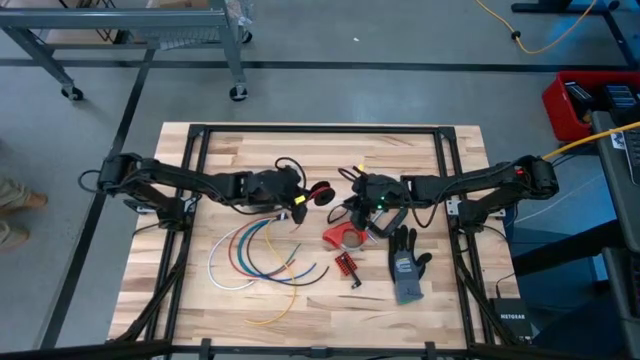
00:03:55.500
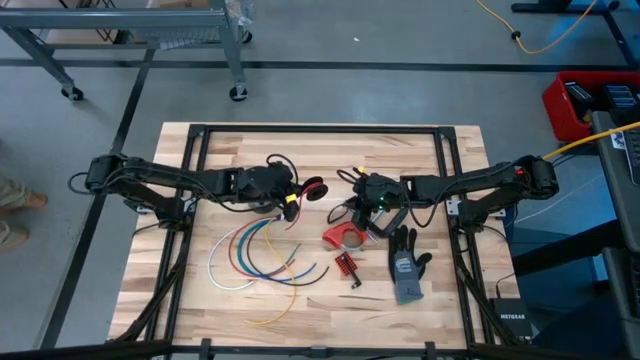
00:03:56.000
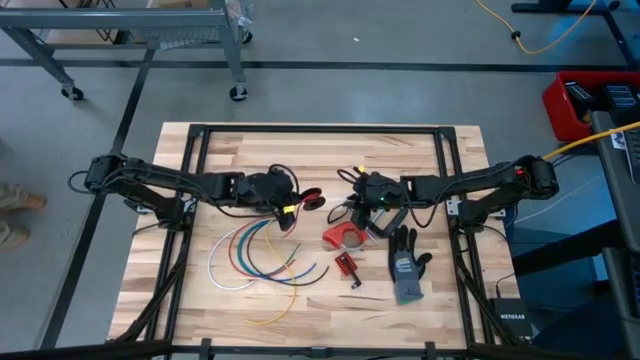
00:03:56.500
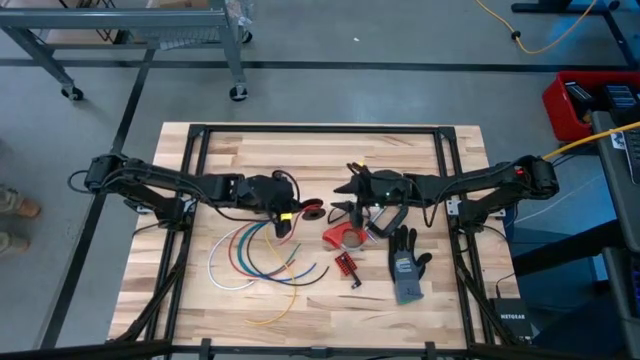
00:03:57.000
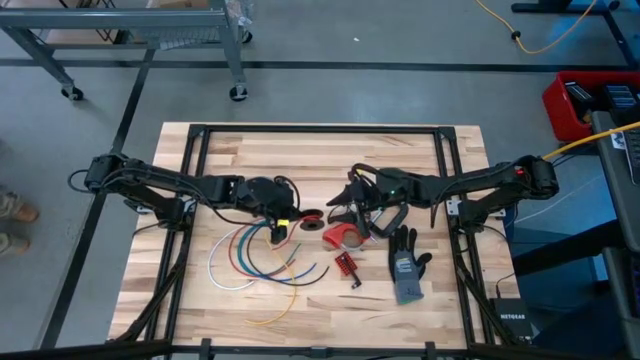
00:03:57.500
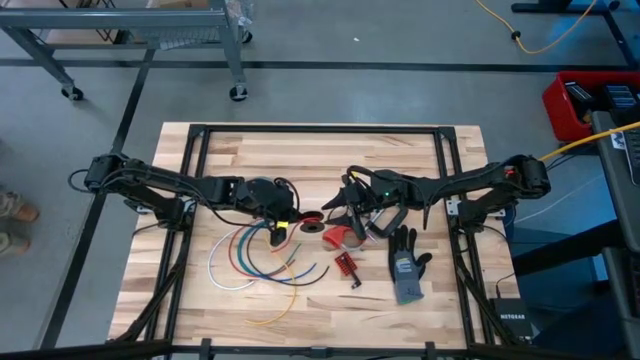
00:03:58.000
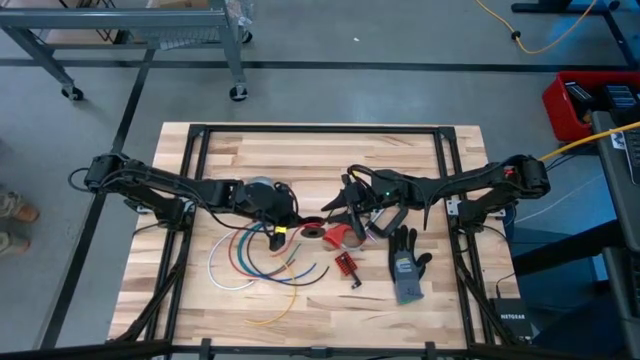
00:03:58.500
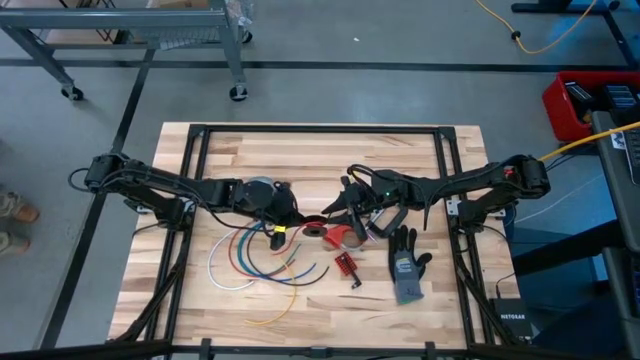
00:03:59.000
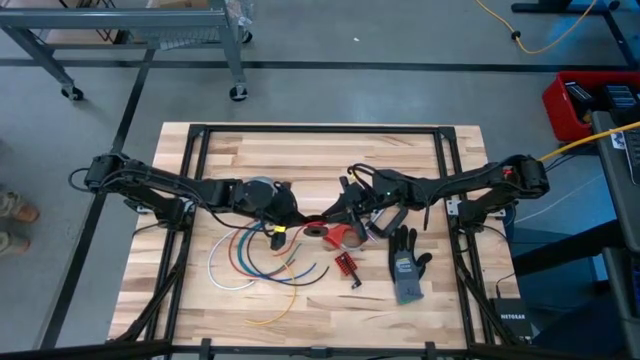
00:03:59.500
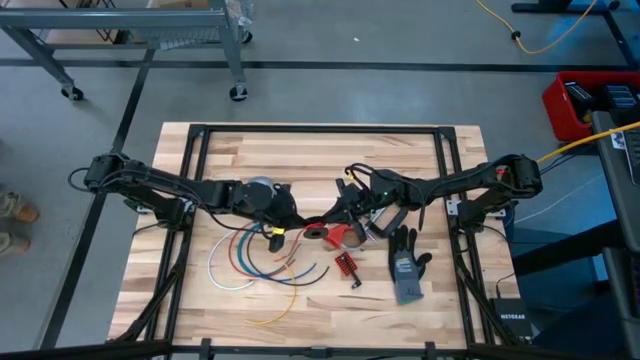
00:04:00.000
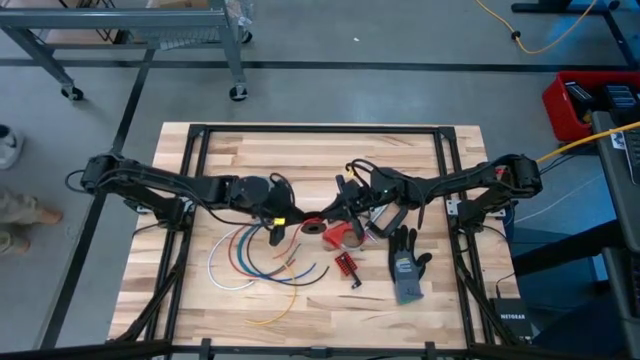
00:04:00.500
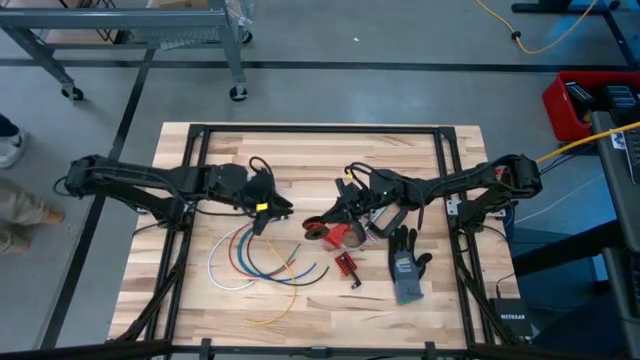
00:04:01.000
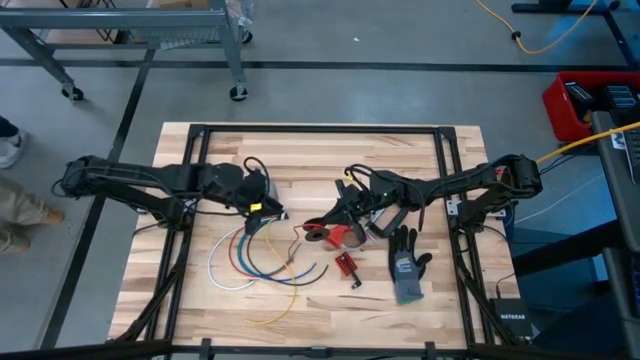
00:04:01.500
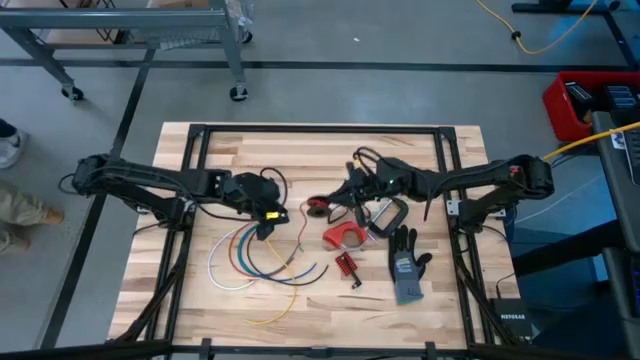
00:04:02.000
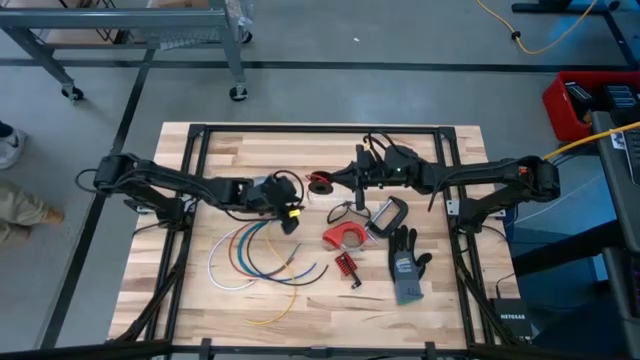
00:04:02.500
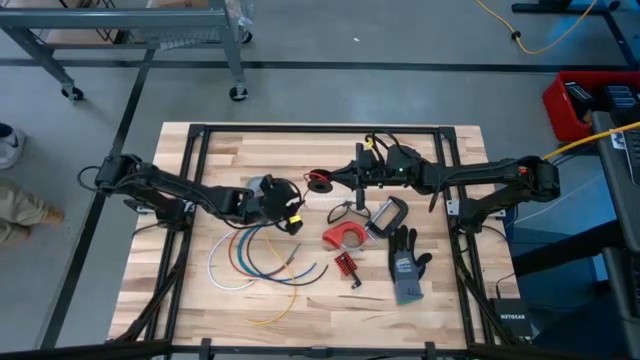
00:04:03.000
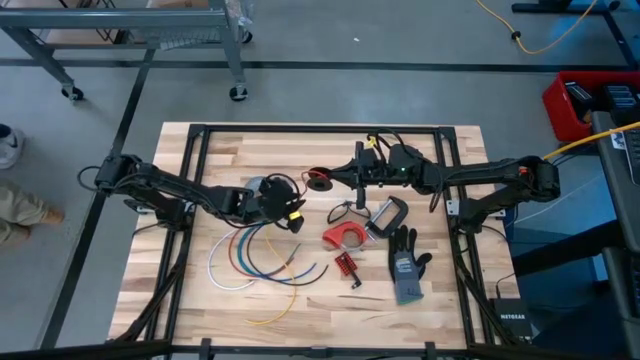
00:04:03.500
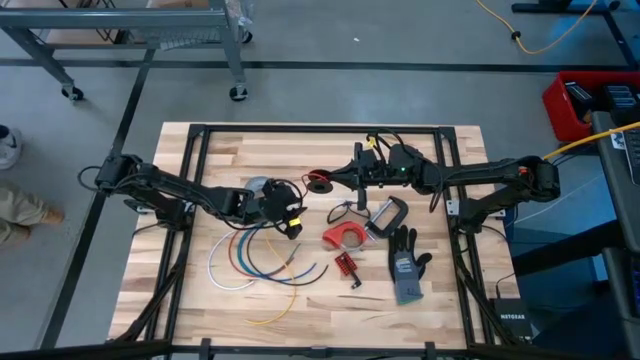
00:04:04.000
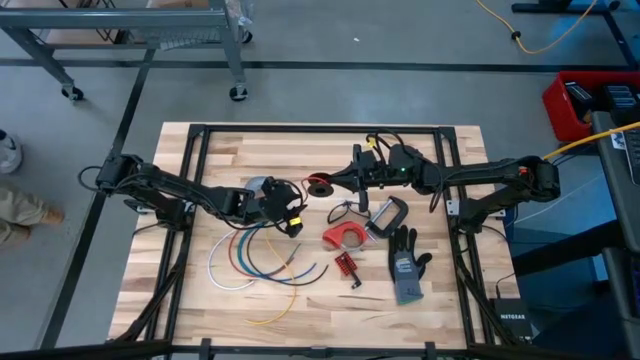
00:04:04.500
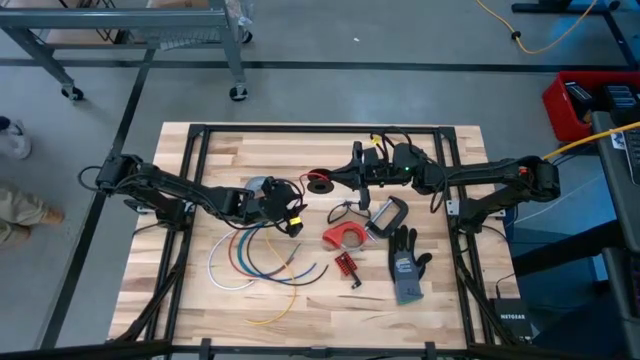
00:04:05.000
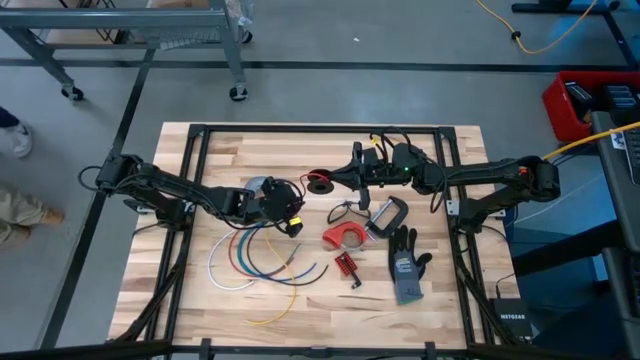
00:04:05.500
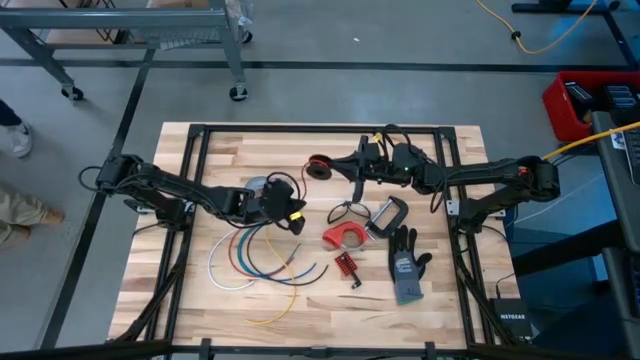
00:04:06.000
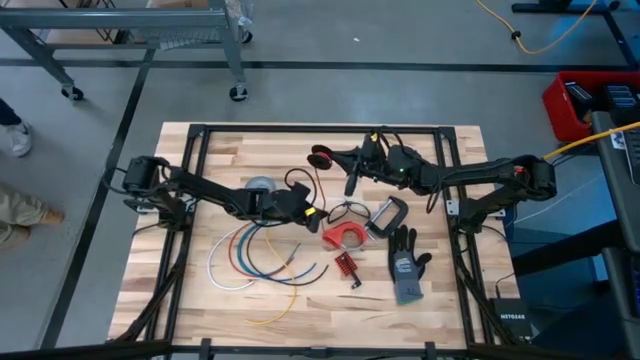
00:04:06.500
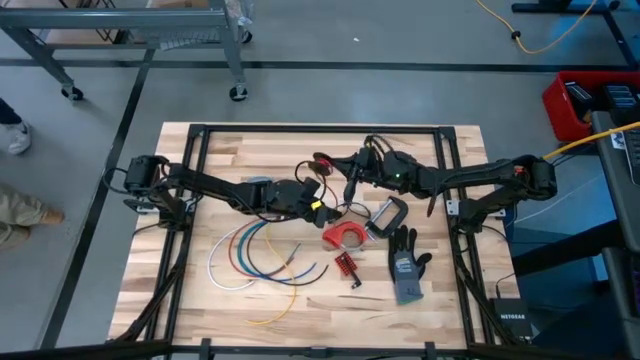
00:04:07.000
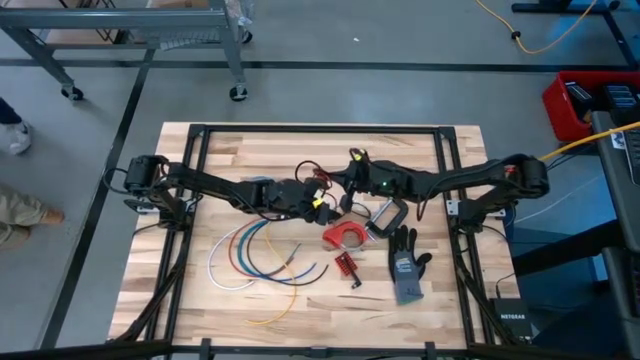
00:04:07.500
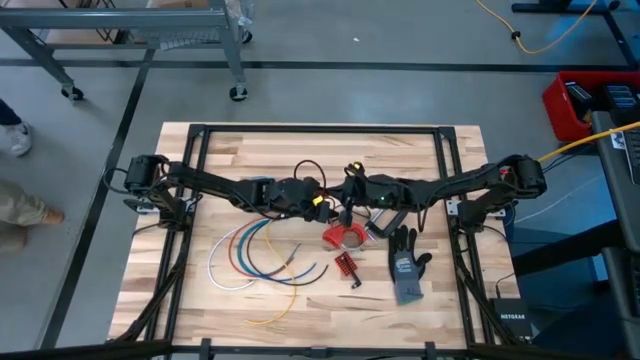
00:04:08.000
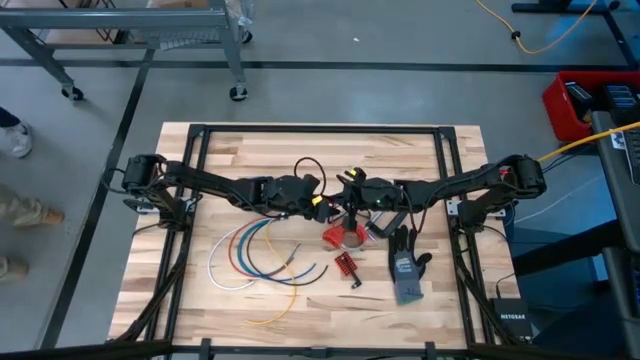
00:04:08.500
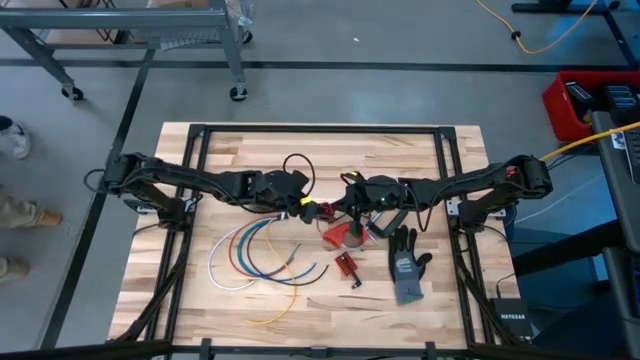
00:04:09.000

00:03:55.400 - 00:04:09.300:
Task: Coil cords
Coil the red wire onto the spool

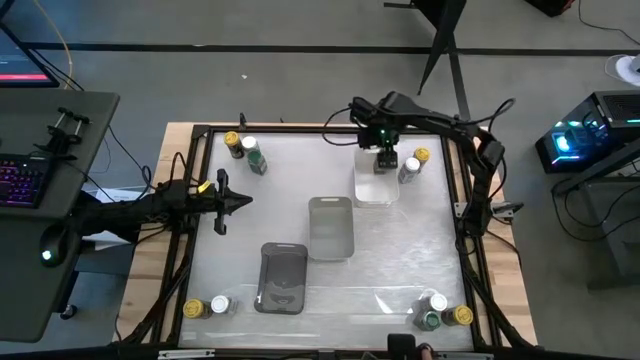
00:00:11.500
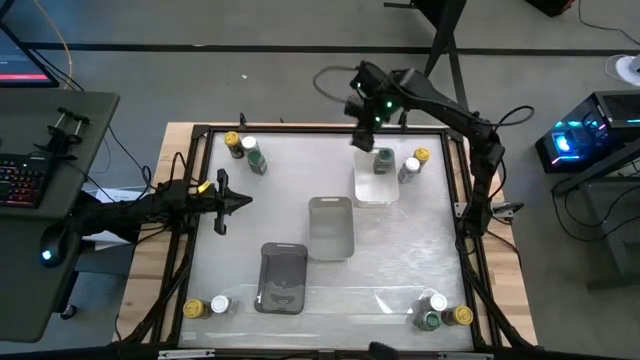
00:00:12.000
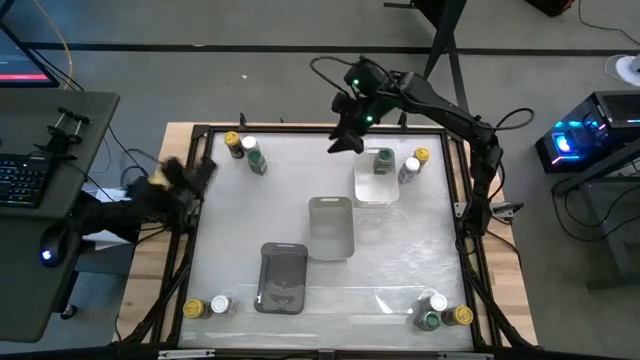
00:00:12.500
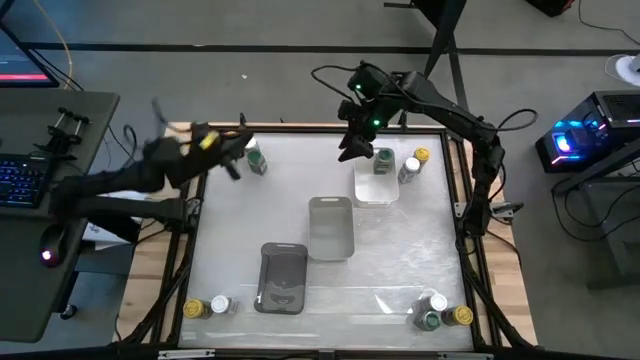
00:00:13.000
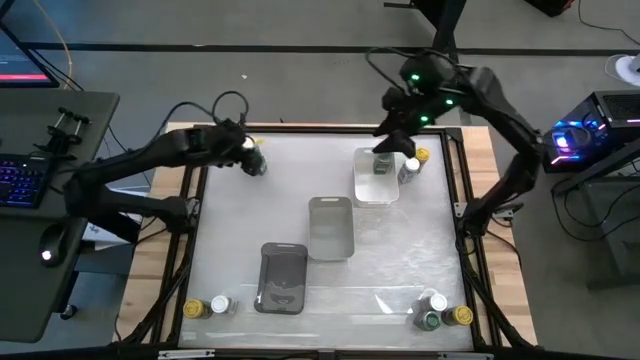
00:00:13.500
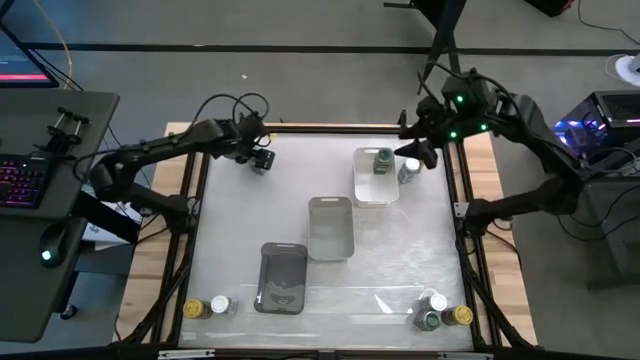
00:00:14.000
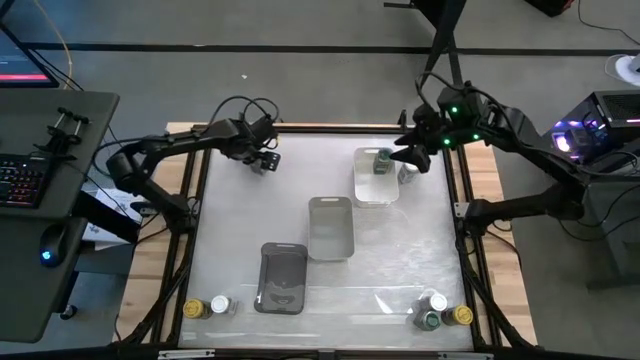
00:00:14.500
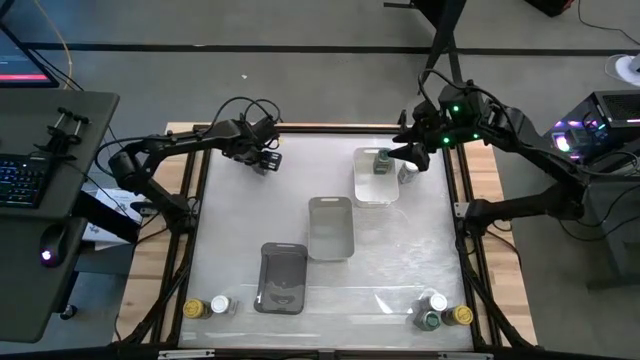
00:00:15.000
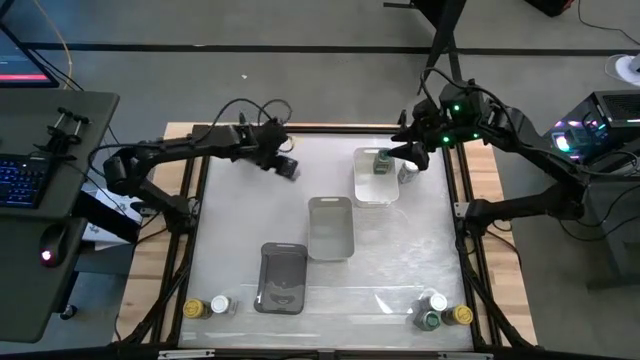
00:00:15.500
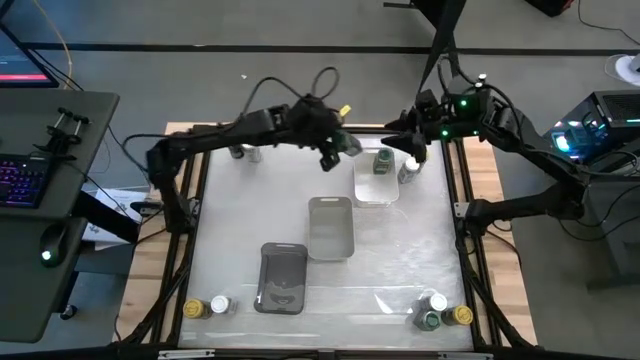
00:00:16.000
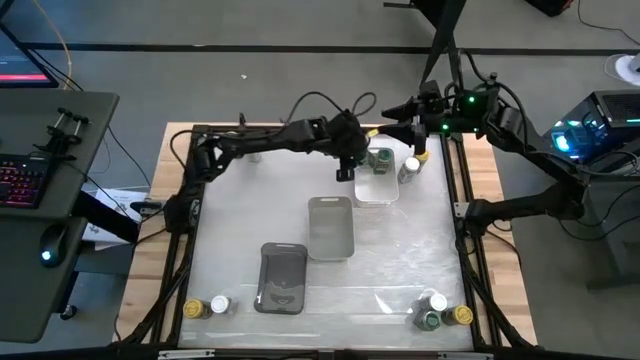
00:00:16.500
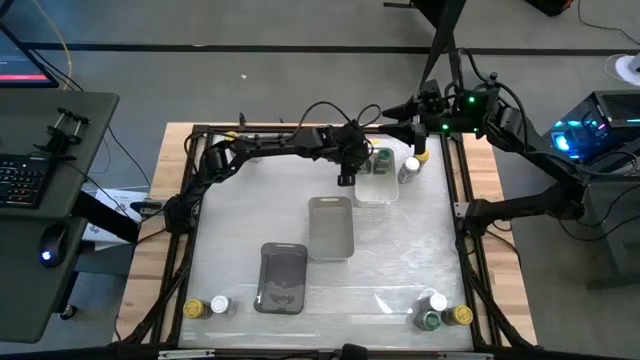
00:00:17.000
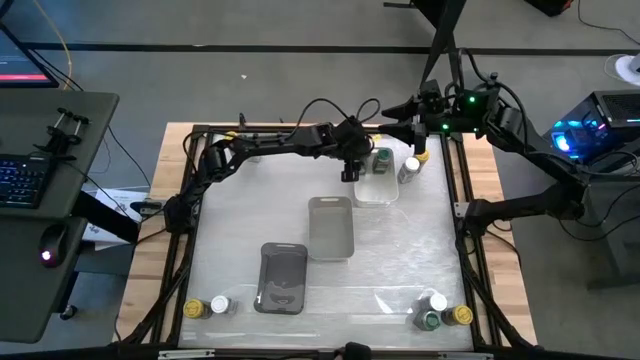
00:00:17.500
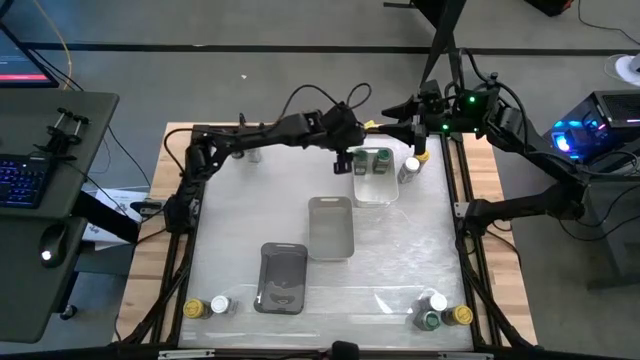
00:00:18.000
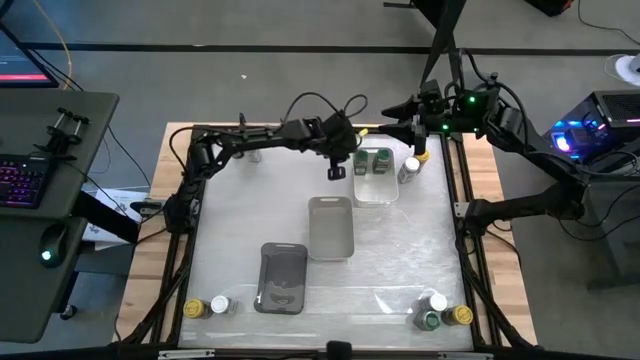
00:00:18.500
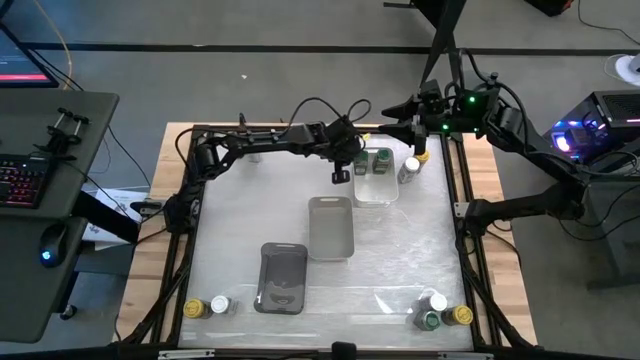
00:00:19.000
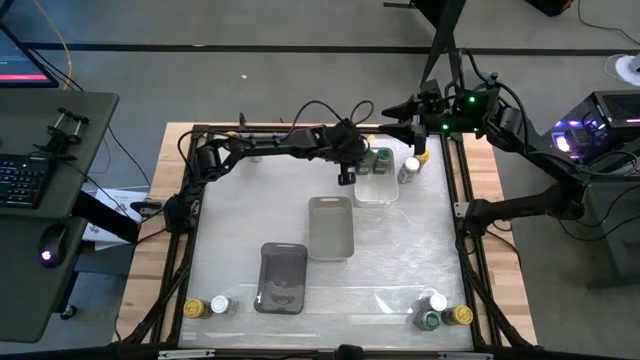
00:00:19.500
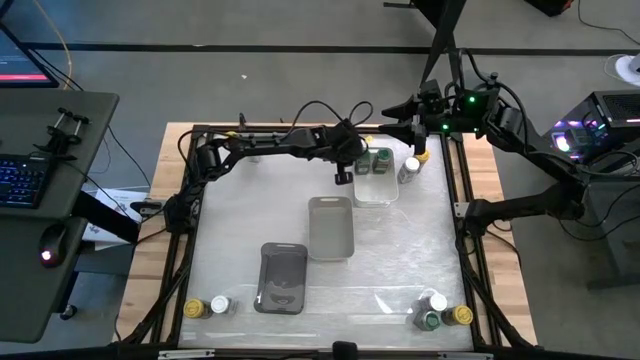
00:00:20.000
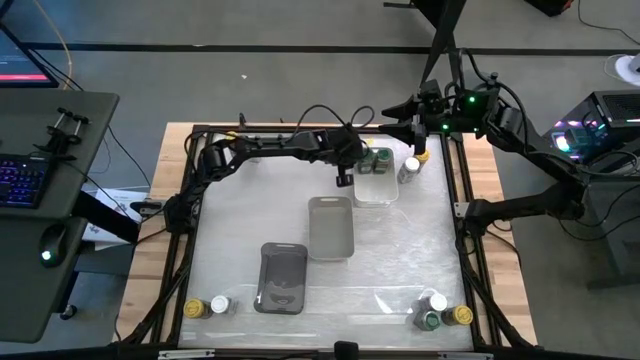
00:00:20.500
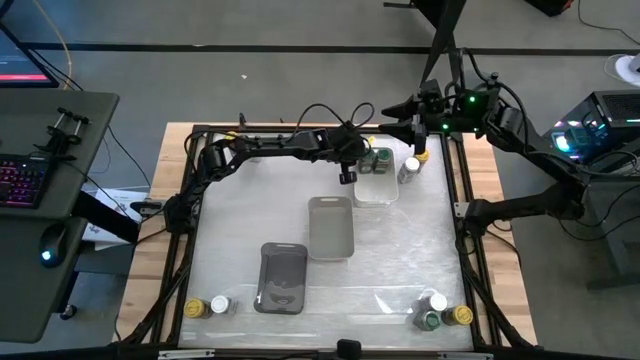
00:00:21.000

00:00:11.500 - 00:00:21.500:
Task: Sort spices by type
Put the green seasoning bottle into the white bin
